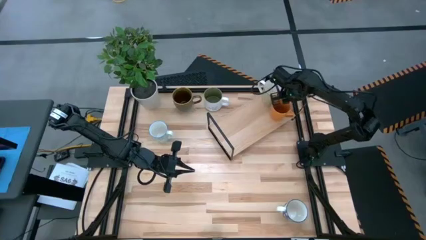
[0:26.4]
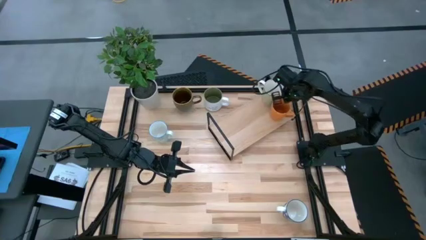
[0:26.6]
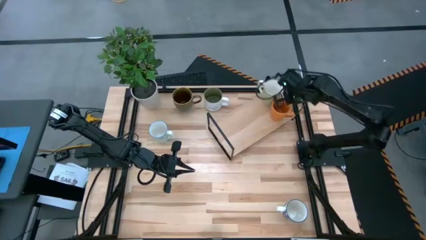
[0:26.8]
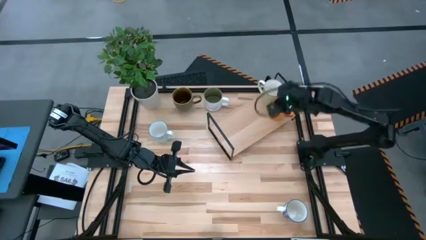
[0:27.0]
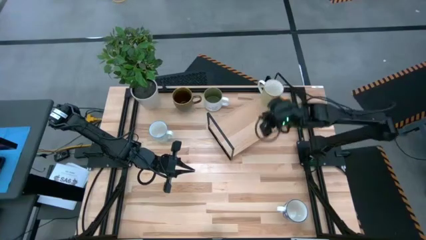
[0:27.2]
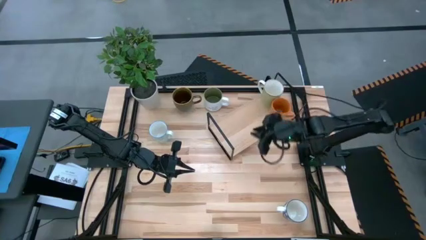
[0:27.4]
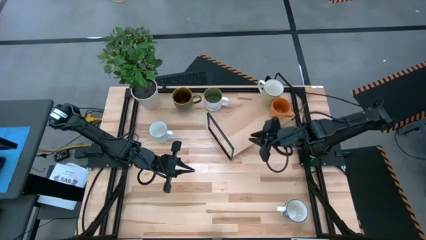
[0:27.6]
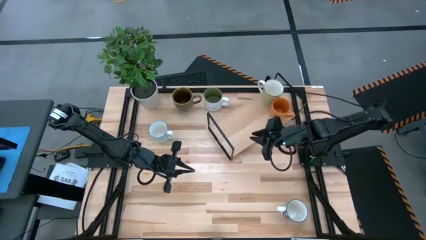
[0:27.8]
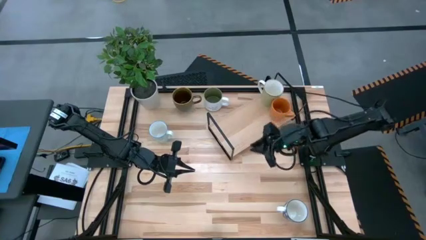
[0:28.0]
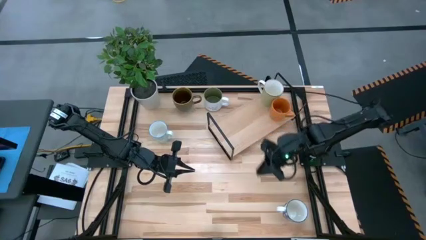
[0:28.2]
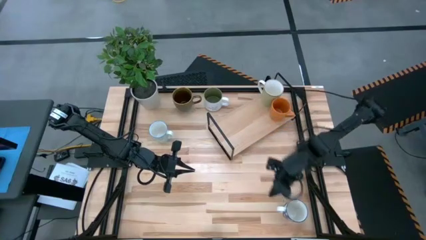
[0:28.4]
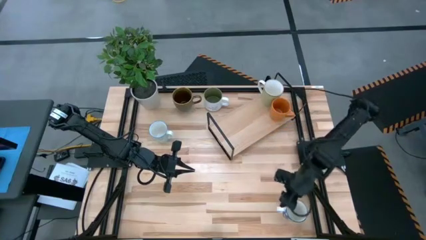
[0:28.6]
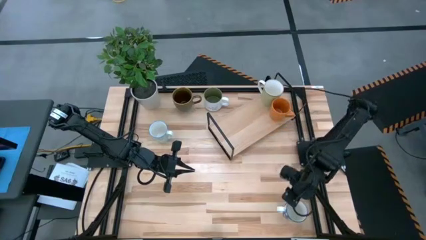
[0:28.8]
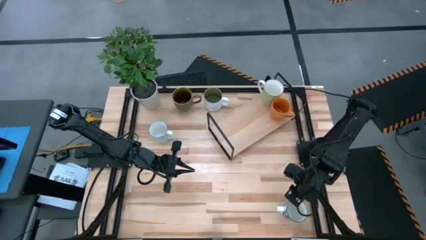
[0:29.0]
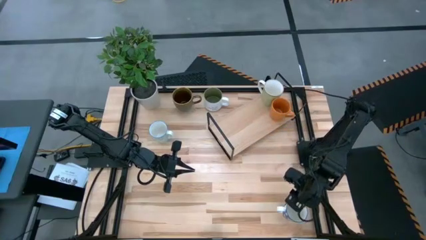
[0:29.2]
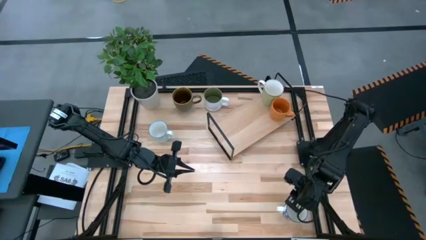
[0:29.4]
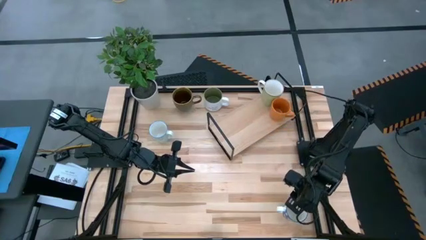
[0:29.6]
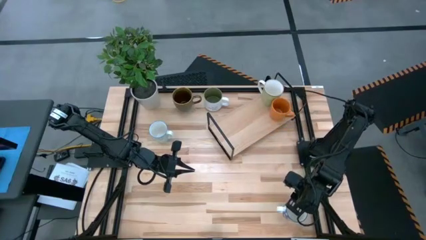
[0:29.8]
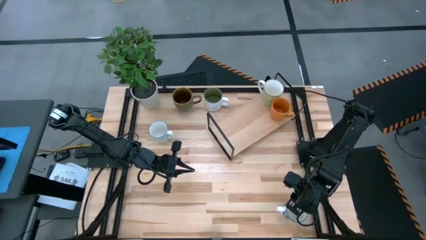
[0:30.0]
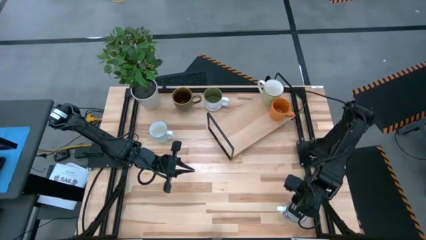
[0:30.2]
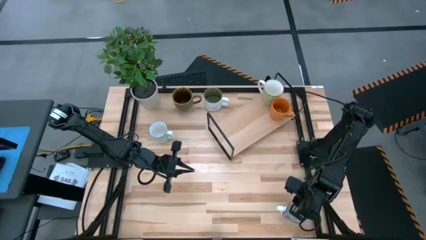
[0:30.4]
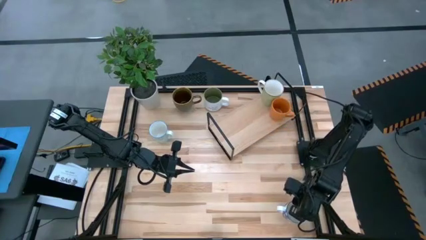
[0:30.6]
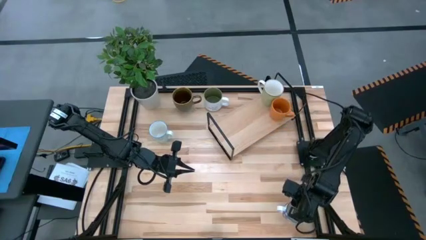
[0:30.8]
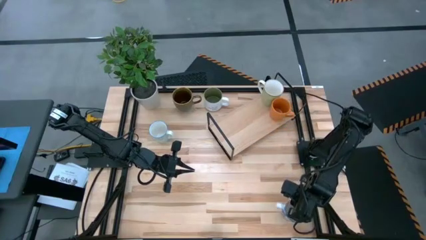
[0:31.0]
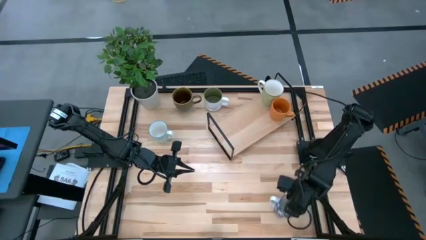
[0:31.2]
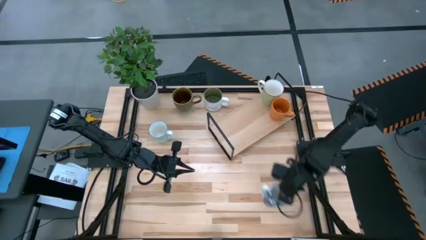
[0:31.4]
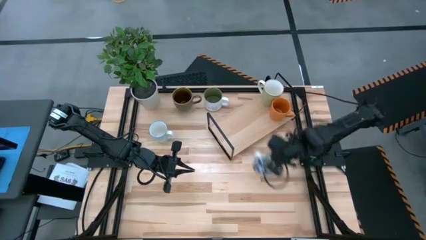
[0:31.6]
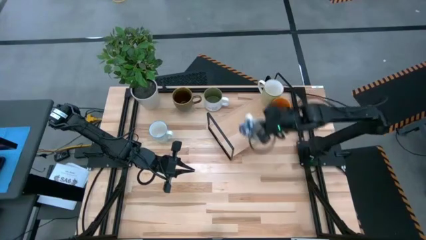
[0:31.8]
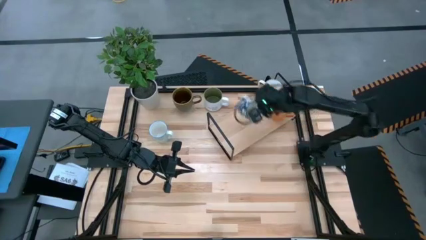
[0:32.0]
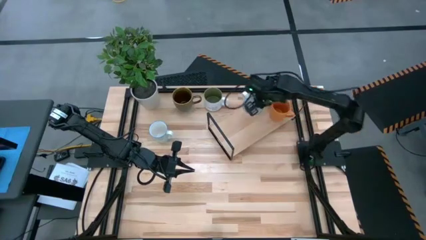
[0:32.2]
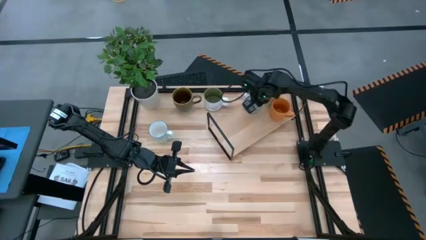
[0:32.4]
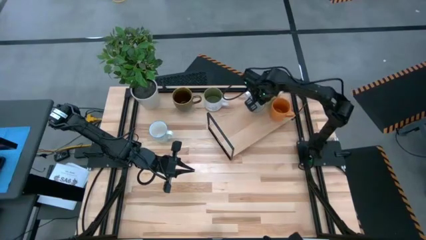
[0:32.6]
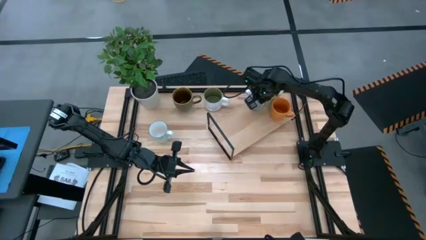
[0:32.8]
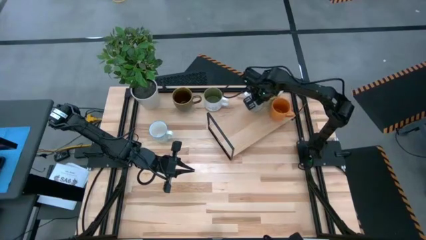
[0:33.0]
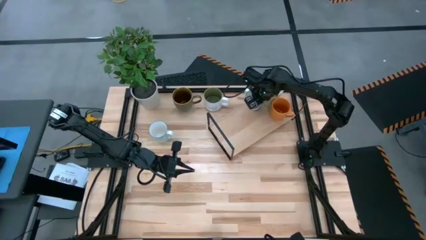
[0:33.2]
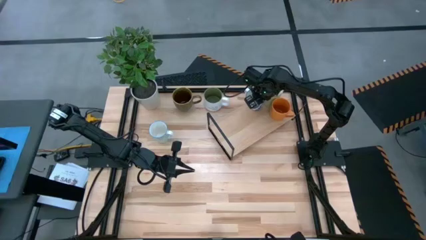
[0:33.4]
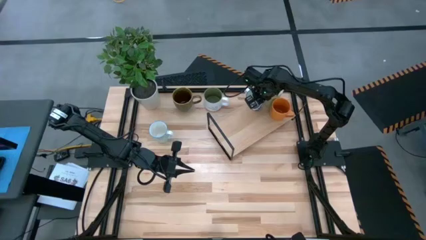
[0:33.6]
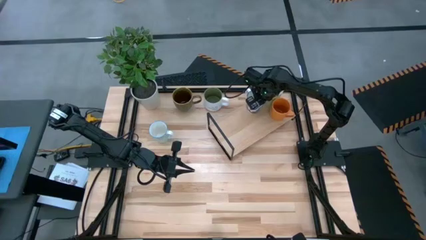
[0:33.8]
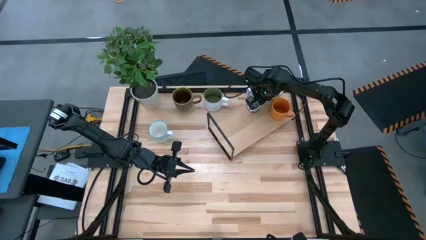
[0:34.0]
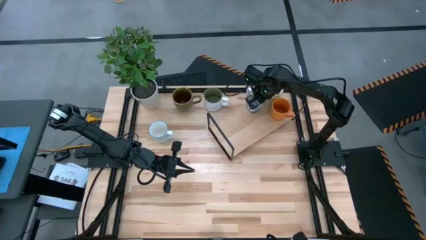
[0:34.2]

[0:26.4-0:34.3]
Task: Place coffee mugs
Put the blue patterned mug on the shelf

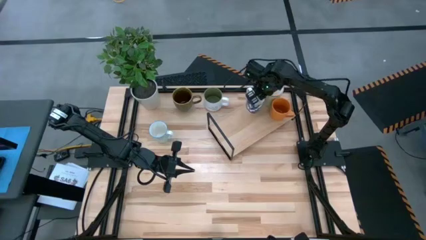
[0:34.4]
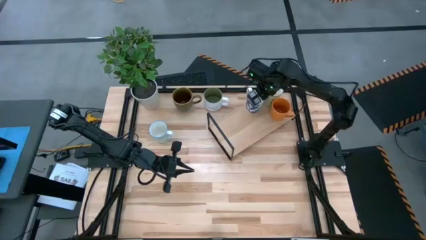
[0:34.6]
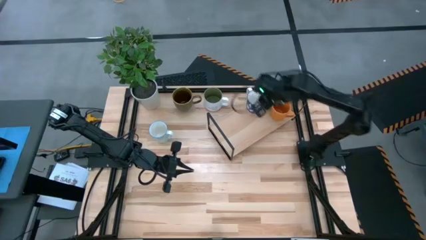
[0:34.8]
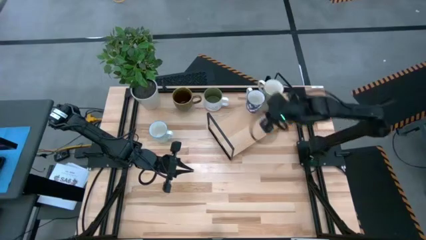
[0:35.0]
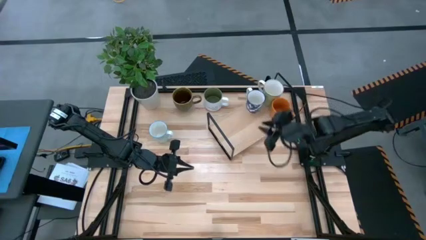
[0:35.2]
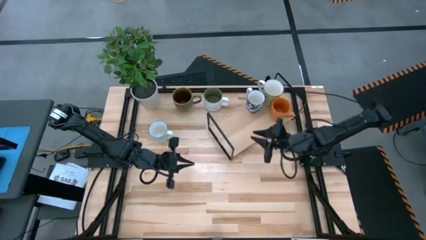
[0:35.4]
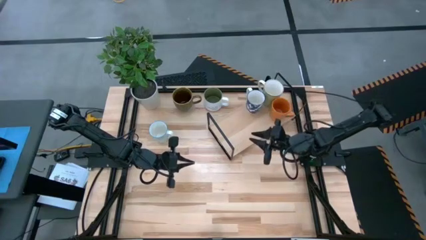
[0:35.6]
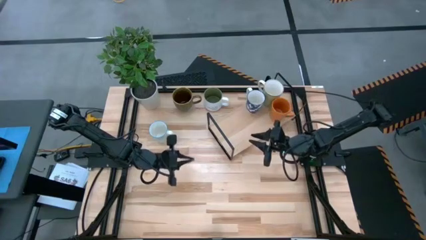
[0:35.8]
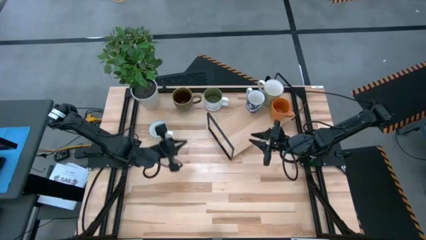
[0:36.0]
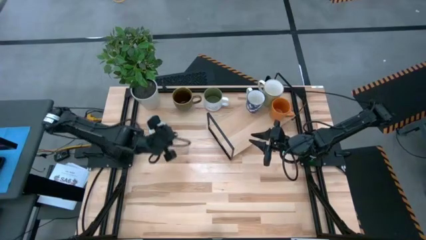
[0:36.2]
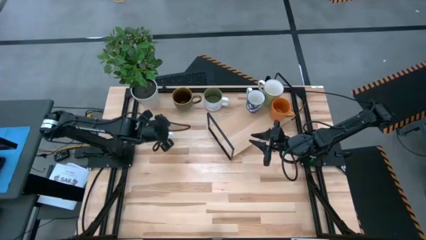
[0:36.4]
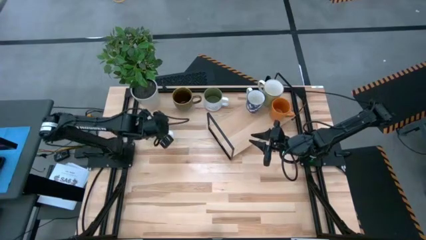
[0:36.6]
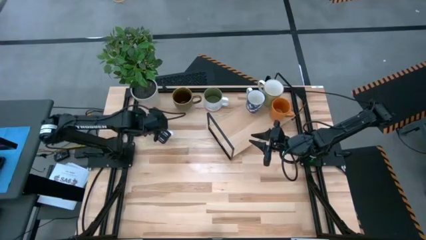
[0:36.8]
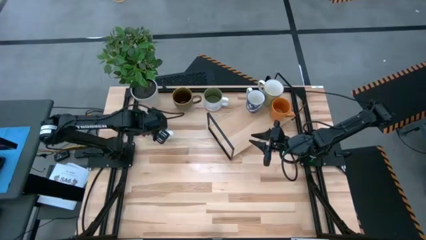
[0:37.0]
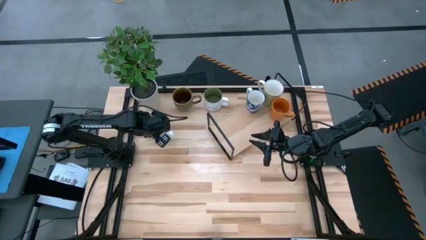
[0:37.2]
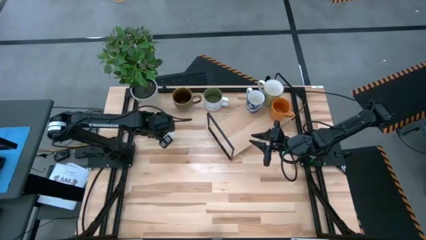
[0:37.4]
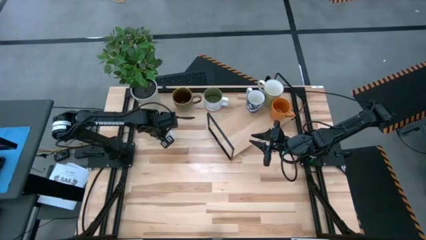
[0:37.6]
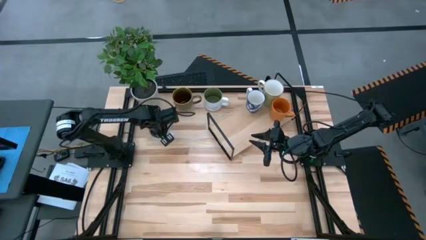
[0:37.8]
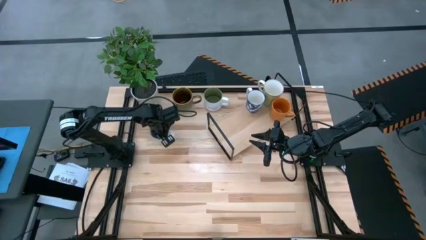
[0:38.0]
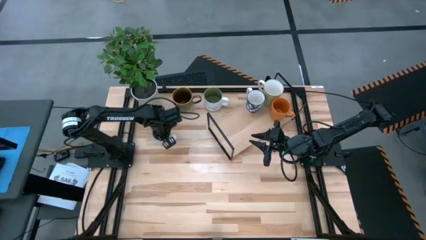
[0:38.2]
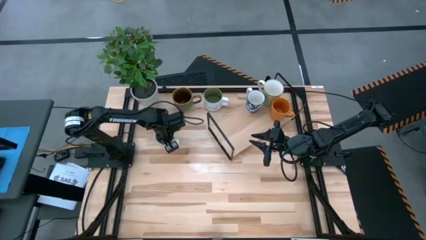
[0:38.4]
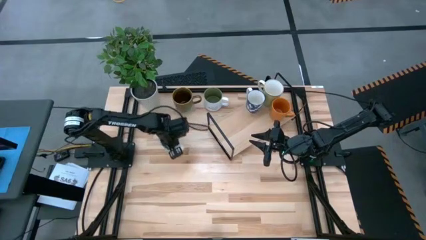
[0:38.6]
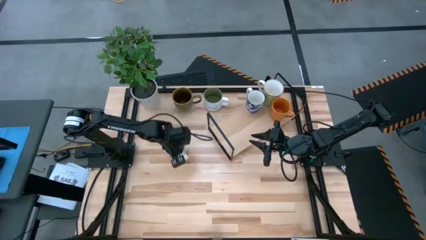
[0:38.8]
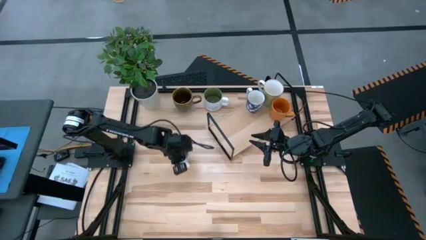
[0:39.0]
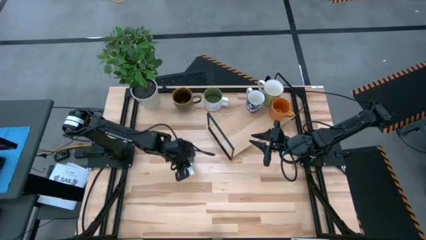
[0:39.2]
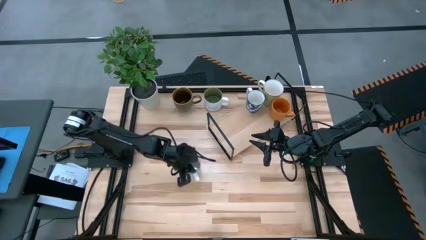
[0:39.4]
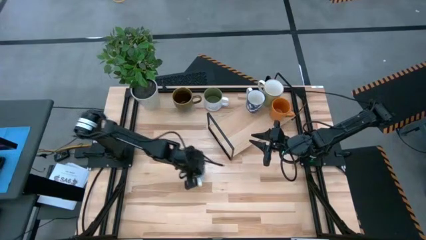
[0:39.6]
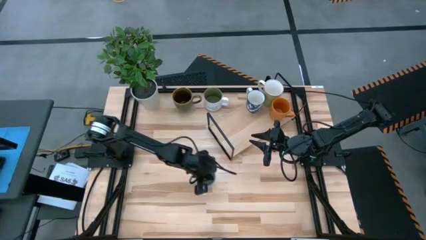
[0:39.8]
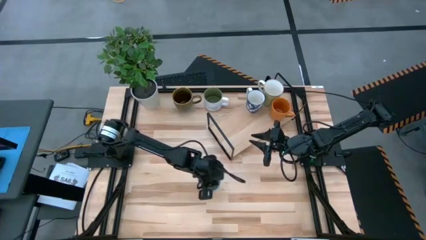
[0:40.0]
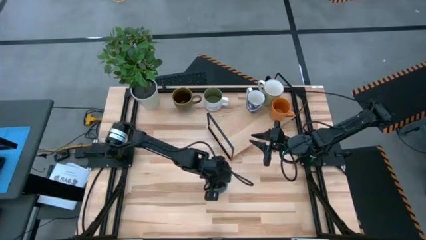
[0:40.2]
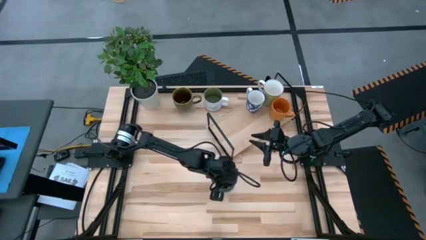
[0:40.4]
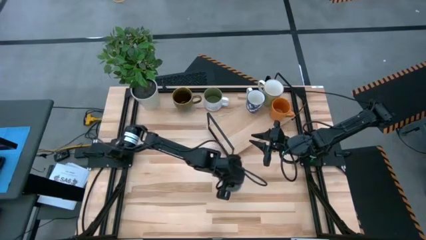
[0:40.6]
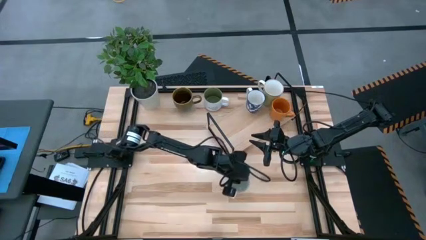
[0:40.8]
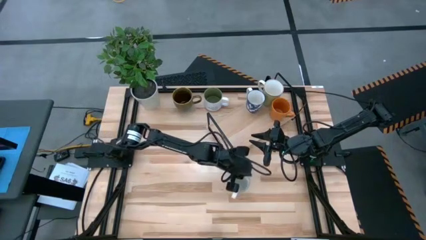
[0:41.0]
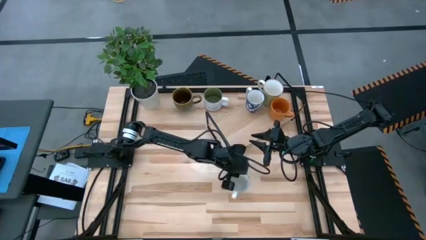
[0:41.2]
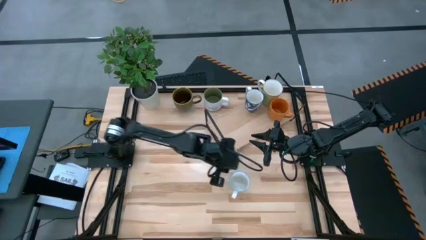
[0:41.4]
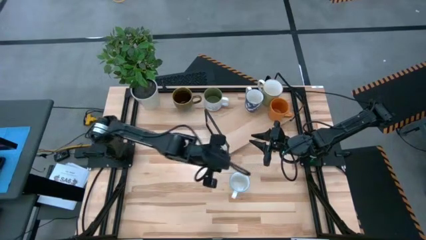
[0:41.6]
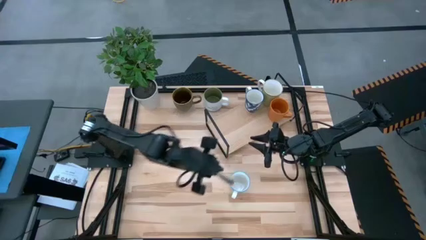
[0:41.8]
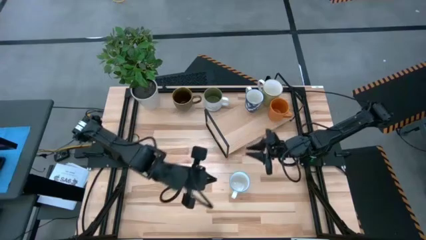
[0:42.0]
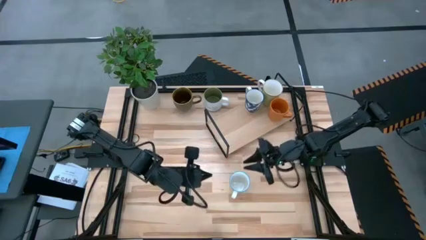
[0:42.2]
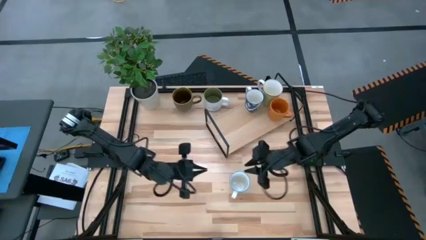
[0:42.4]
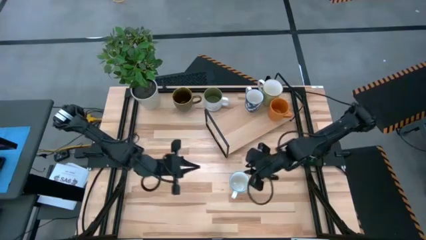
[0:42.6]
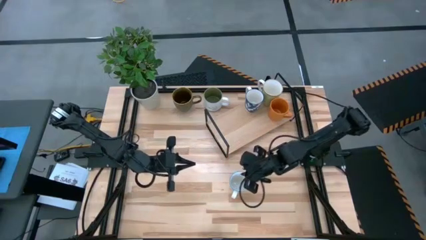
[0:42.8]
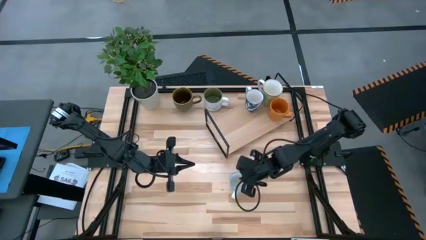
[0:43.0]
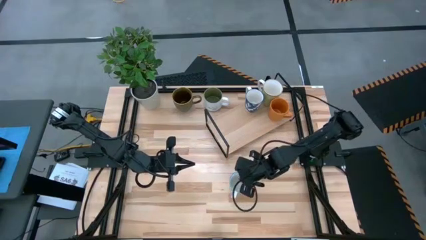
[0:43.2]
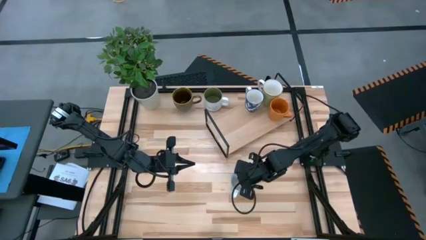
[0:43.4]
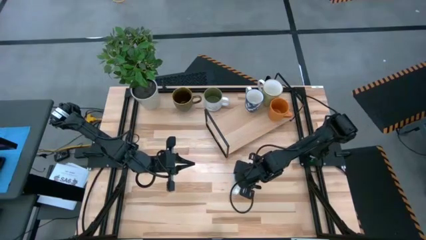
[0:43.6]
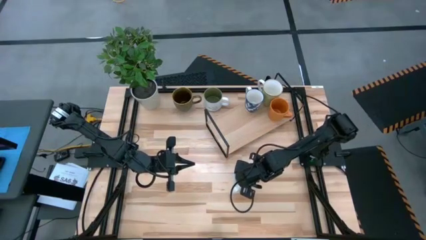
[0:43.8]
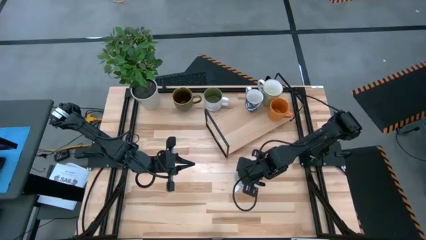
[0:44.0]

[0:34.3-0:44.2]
Put the green patterned mug on the shelf
